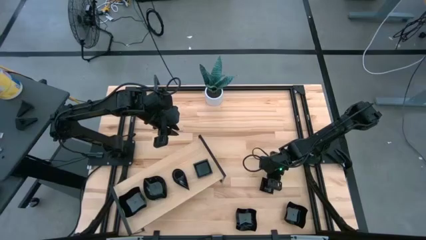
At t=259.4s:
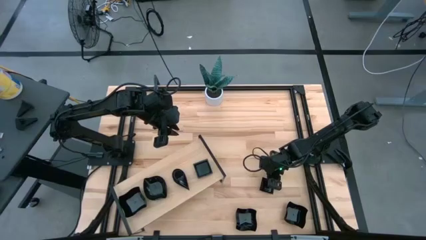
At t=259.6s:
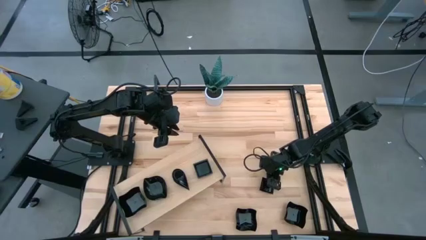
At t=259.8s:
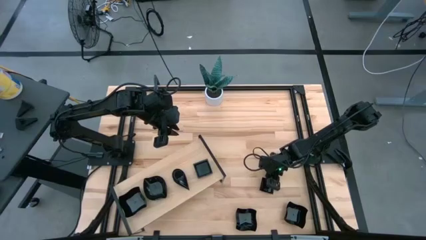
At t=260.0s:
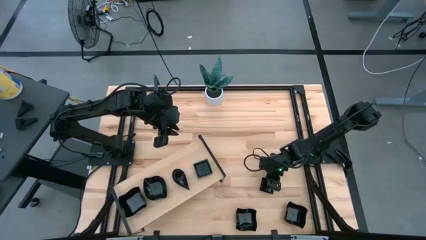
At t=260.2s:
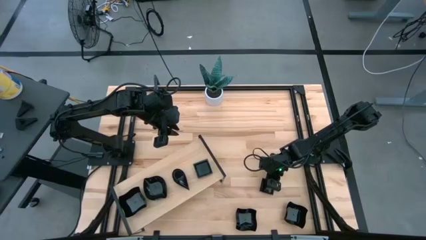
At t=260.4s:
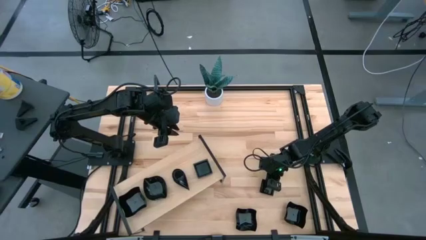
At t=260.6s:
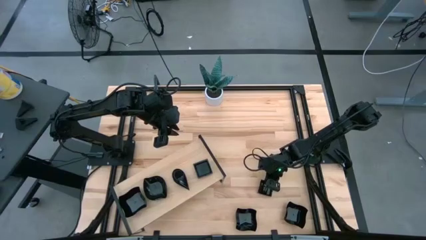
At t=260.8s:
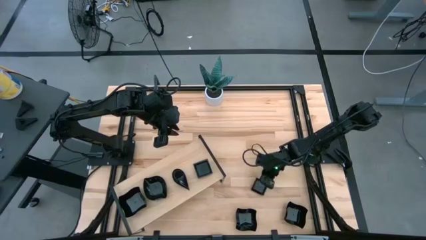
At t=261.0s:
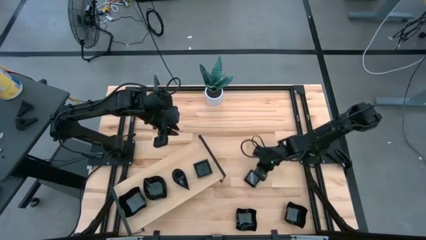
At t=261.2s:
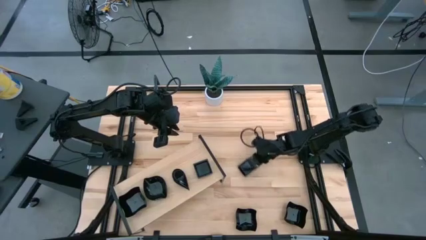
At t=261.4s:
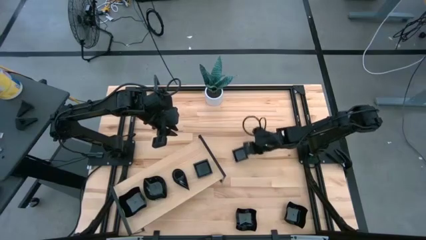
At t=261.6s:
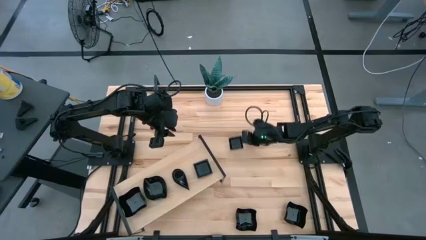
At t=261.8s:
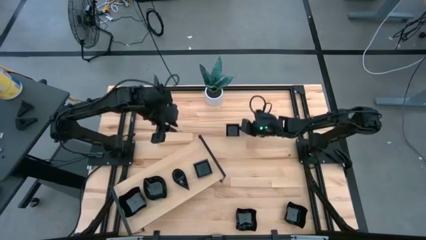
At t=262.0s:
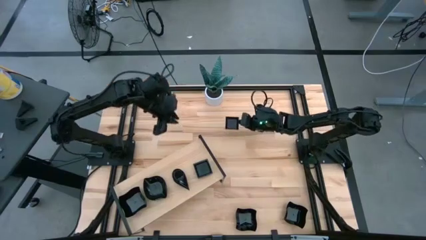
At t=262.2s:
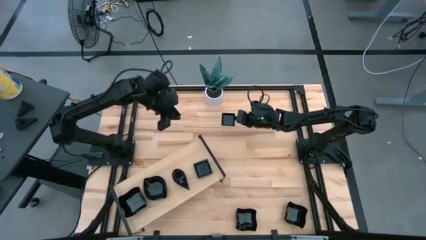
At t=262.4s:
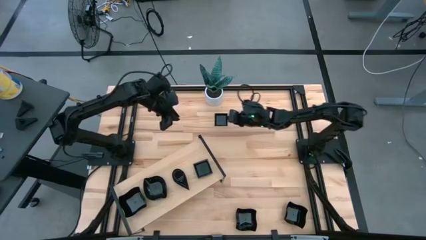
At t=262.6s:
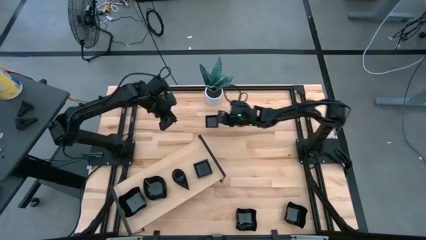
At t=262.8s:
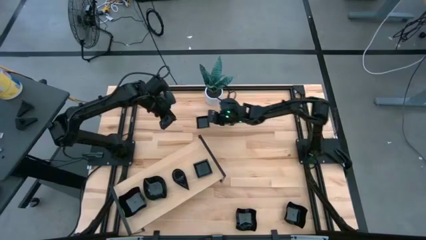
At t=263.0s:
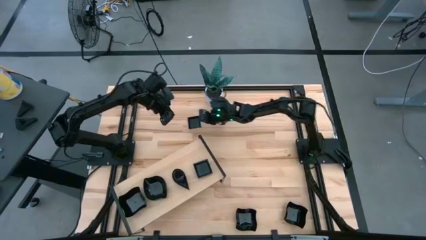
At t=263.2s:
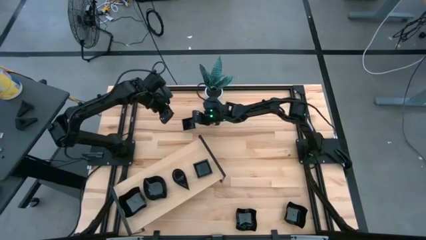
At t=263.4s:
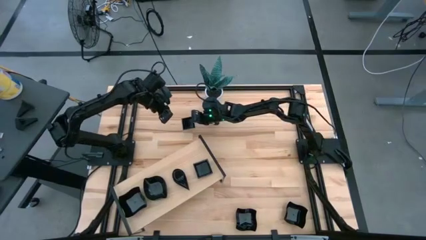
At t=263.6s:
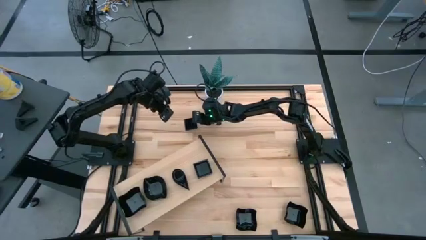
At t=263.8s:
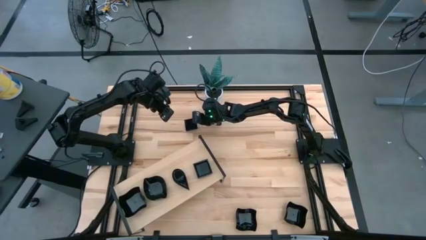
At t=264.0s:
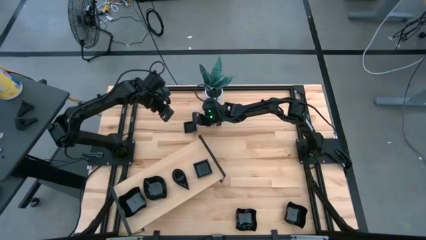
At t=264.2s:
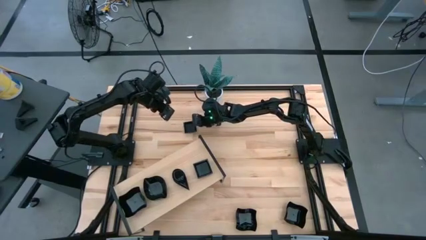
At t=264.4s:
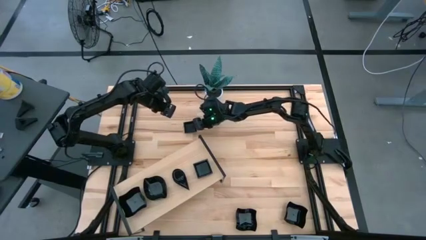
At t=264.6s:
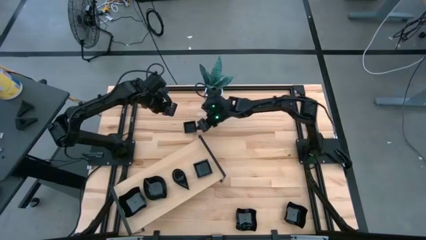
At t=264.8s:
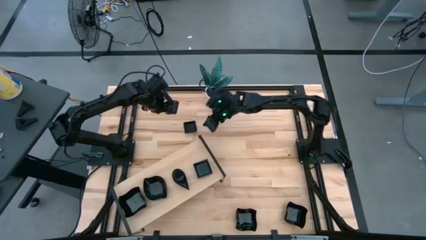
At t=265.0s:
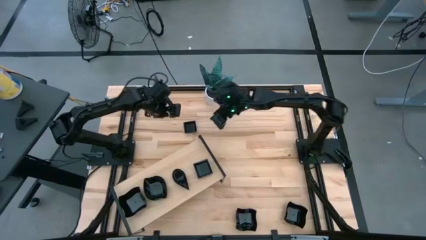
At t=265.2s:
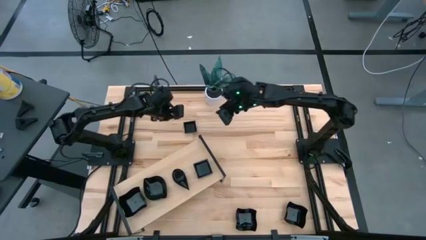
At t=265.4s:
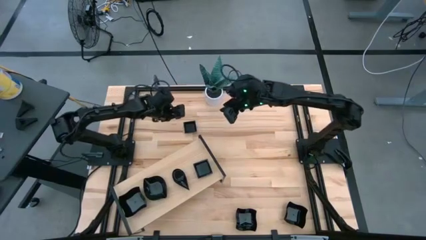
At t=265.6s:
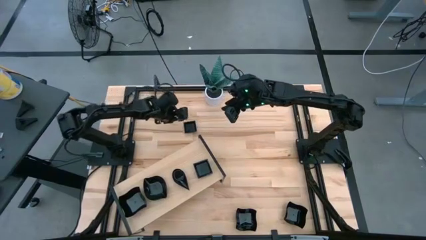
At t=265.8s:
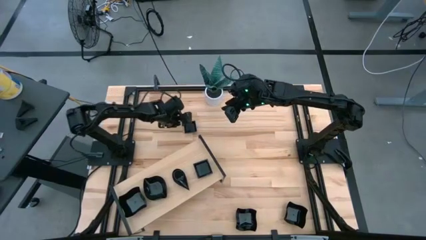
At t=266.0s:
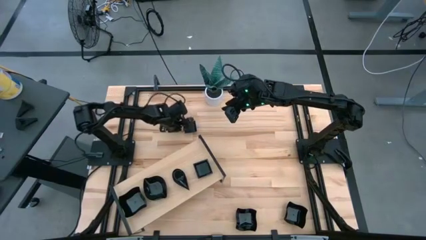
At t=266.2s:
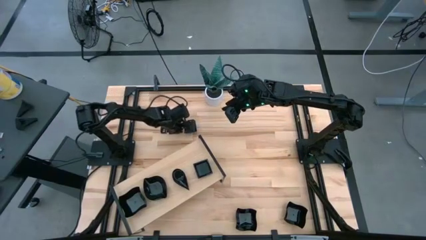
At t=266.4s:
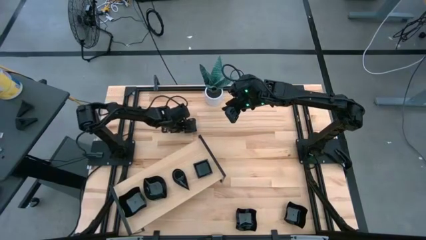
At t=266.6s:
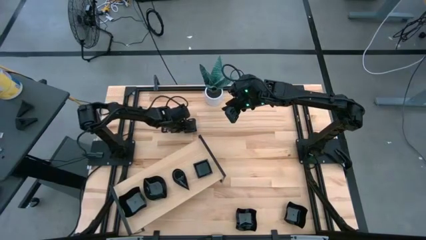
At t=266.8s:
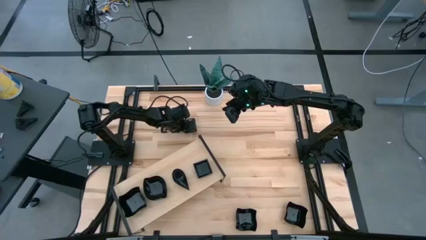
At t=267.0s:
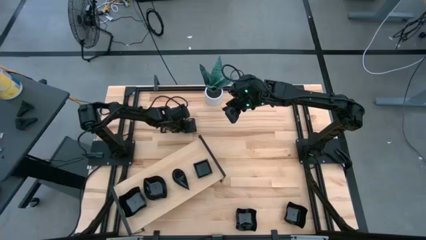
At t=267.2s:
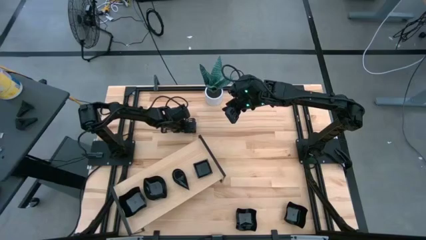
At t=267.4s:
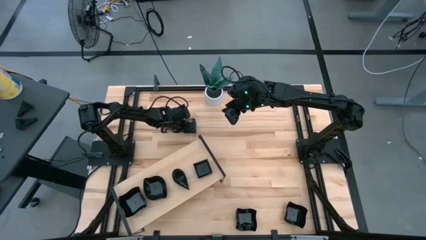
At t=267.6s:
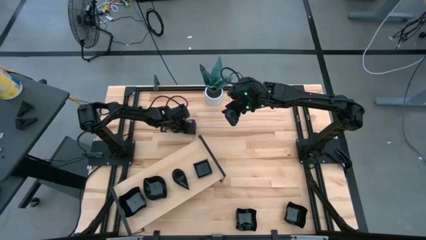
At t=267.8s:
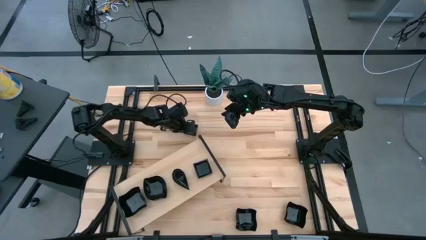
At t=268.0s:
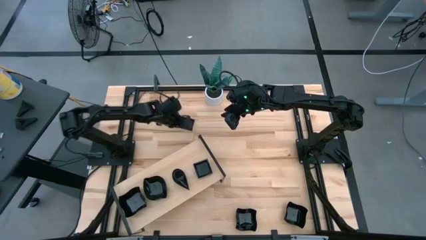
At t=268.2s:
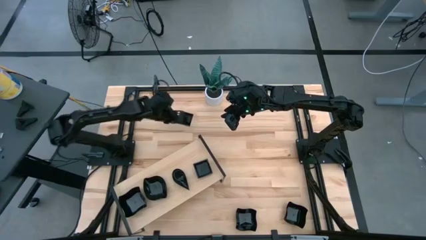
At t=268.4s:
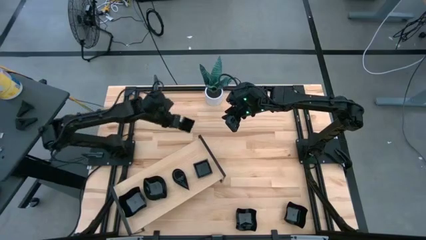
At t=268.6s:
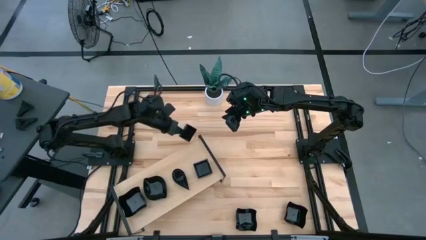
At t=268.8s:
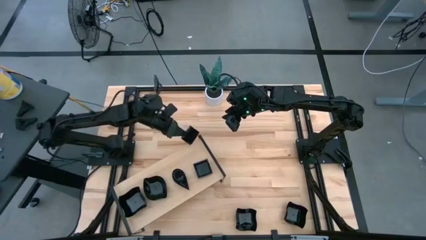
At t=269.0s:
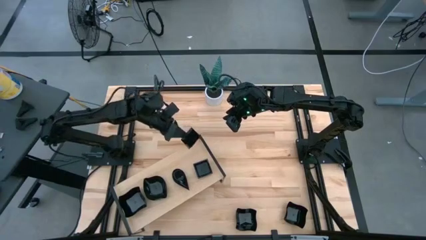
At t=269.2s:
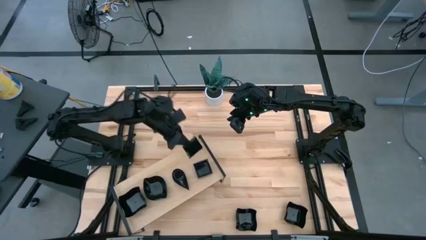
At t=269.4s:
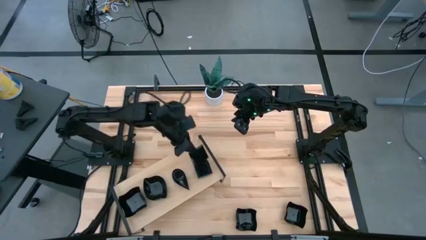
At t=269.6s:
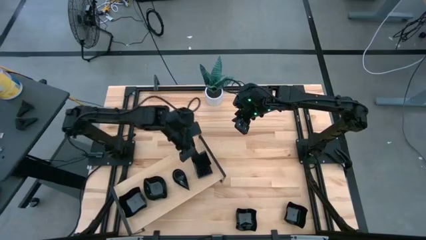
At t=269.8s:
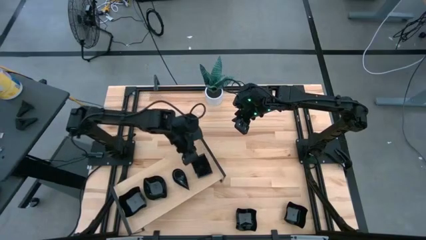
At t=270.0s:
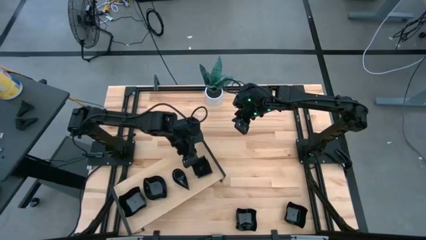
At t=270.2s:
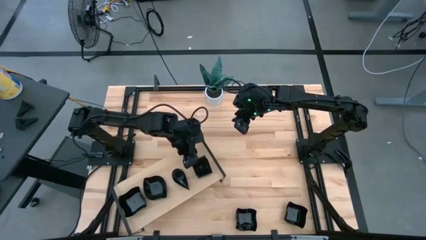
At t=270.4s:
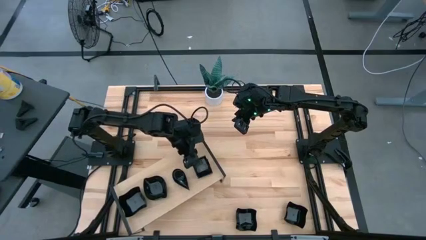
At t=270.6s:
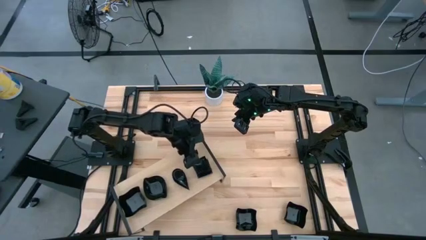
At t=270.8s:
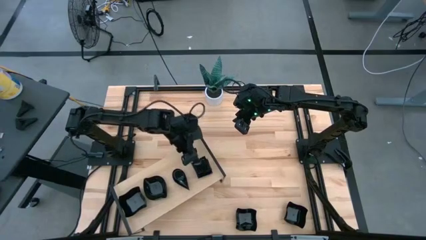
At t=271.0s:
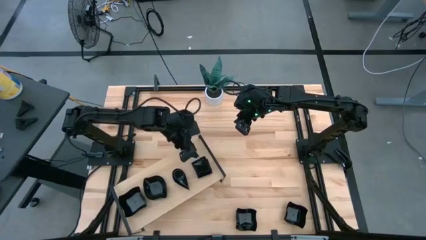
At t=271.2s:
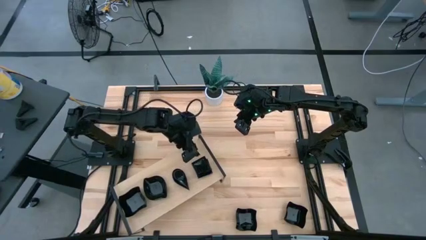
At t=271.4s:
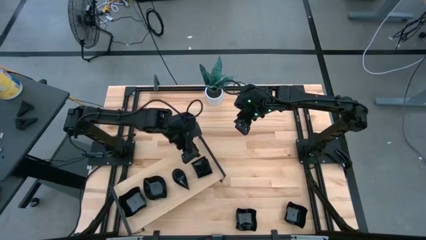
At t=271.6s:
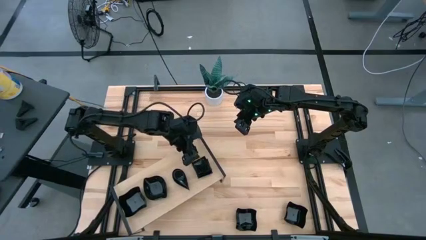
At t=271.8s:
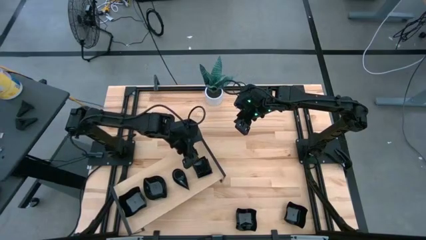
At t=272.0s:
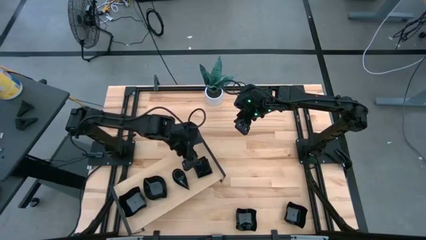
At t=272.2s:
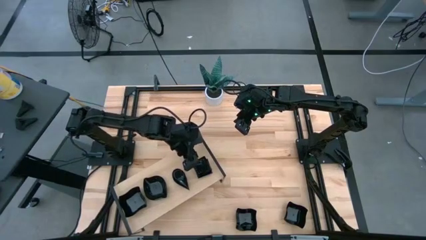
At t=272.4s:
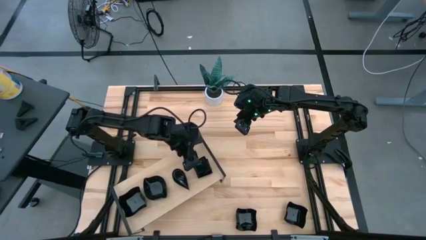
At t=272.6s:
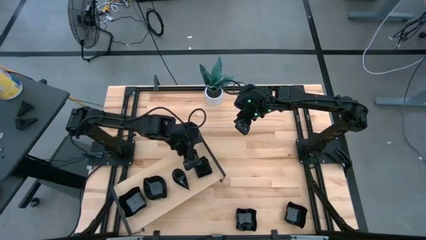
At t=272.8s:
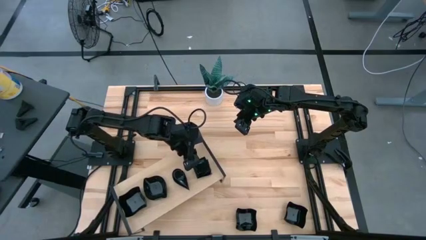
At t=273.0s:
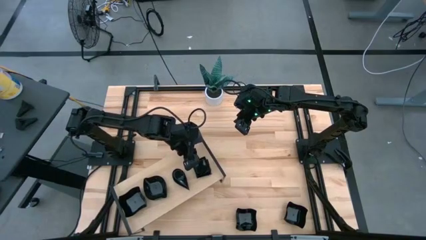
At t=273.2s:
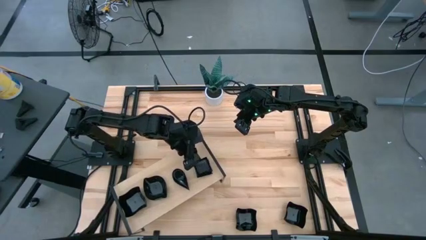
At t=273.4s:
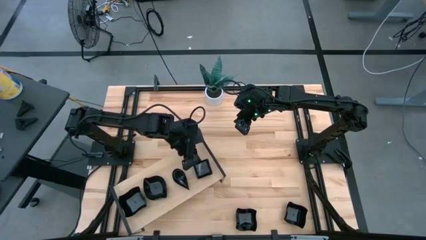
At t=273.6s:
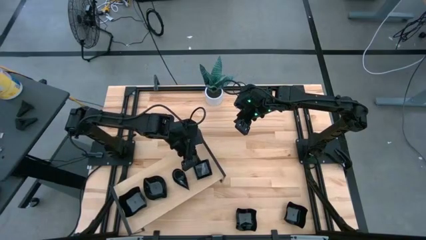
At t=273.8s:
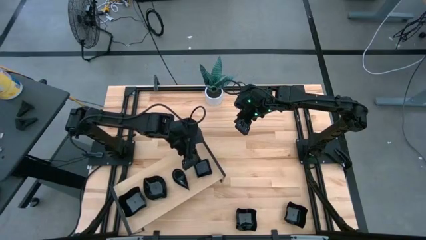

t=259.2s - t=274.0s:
Task: Pick & Place Mini shaped plates
Stack the black square plate on top of the black square plate on the shelf
